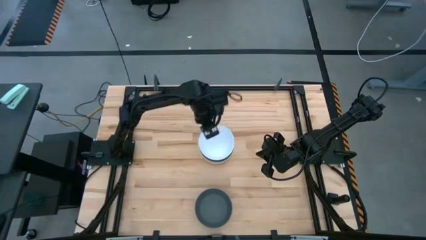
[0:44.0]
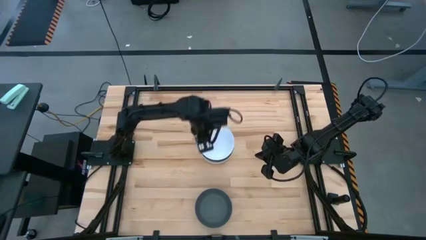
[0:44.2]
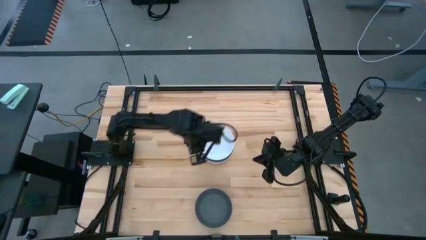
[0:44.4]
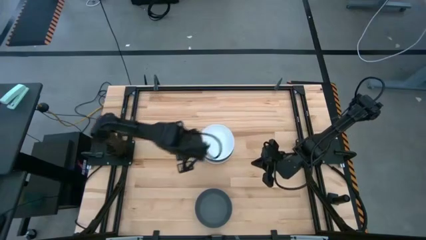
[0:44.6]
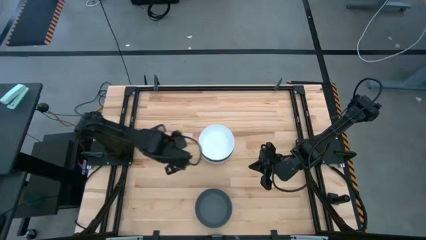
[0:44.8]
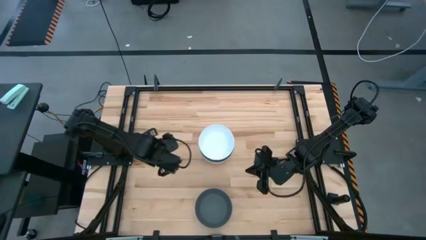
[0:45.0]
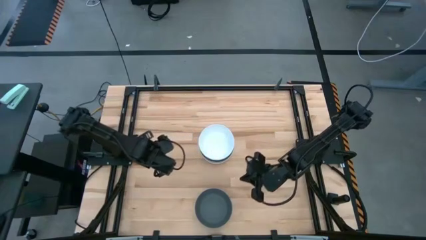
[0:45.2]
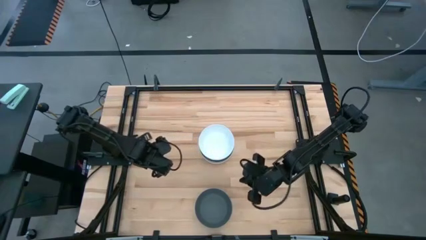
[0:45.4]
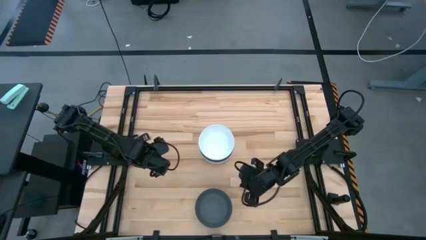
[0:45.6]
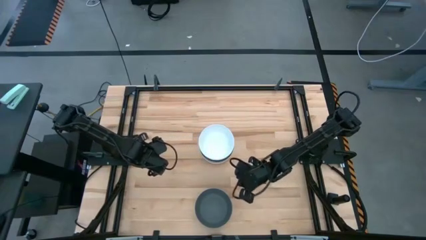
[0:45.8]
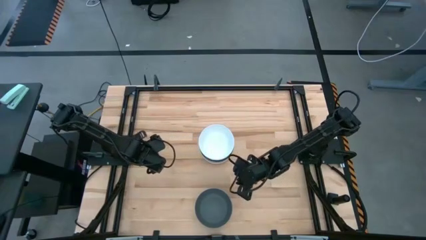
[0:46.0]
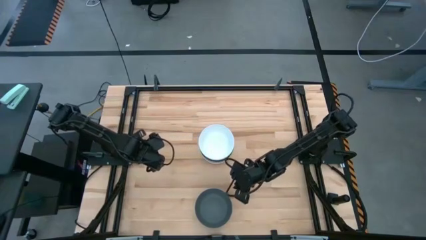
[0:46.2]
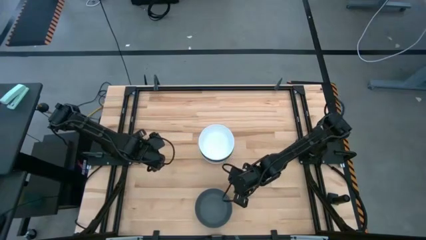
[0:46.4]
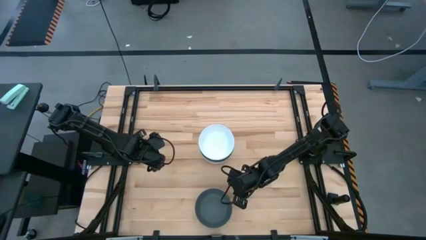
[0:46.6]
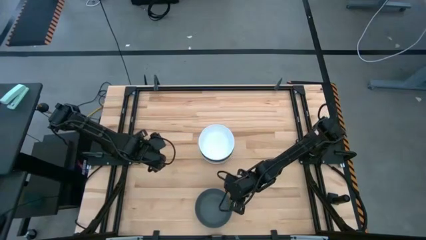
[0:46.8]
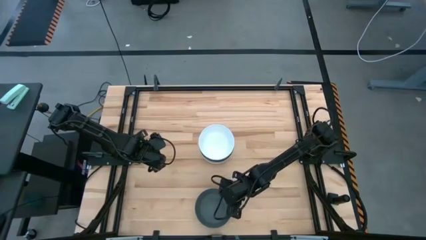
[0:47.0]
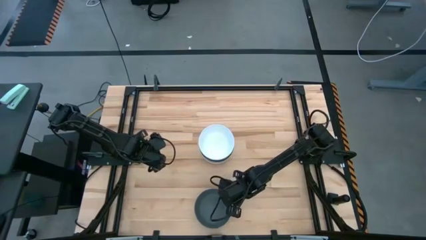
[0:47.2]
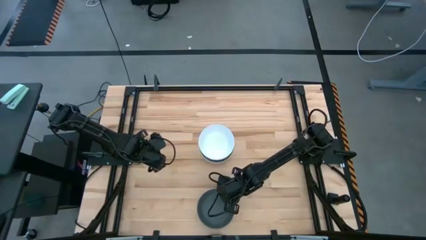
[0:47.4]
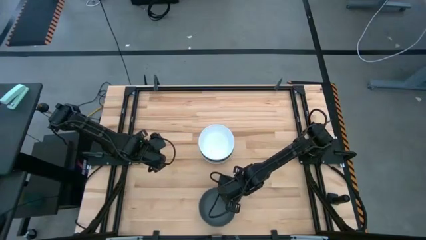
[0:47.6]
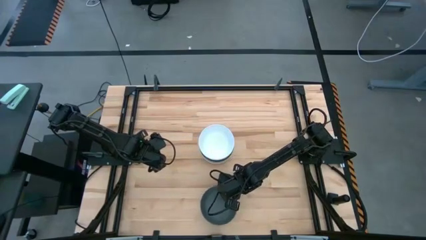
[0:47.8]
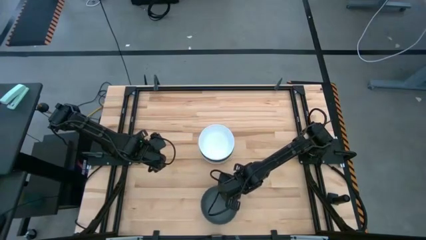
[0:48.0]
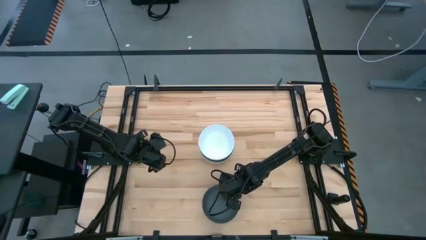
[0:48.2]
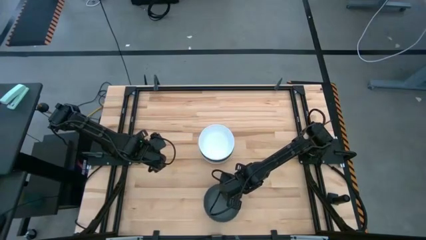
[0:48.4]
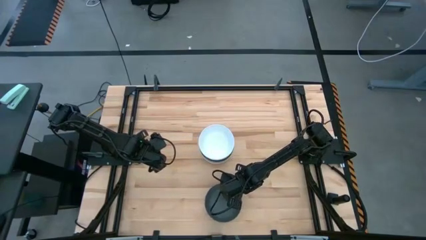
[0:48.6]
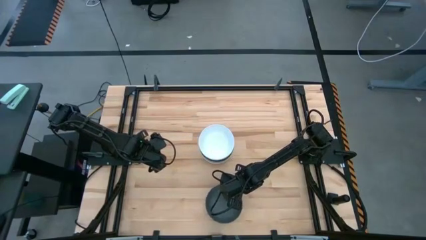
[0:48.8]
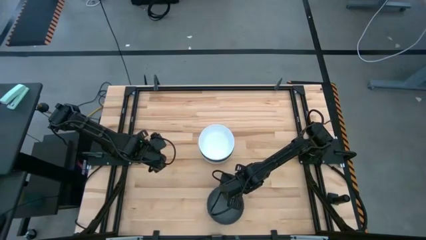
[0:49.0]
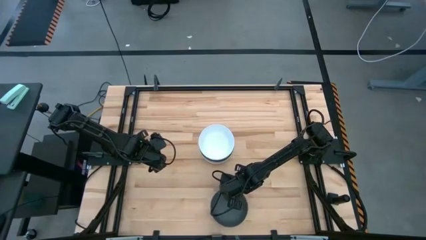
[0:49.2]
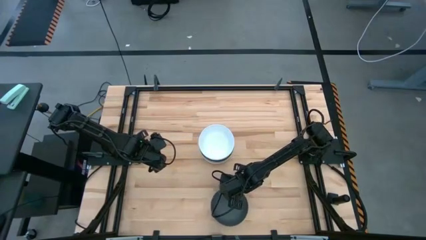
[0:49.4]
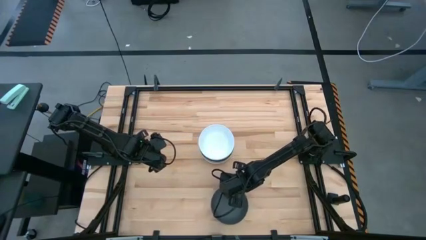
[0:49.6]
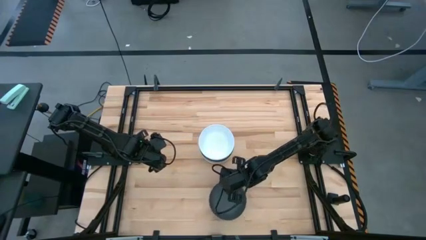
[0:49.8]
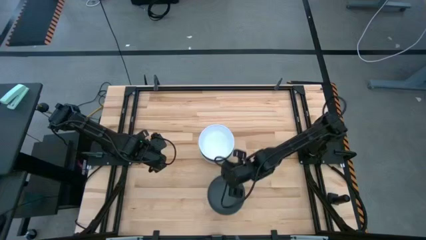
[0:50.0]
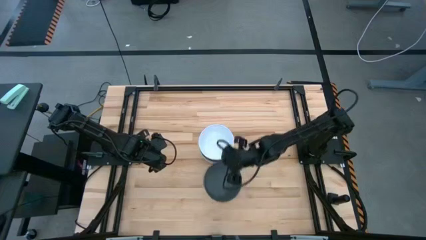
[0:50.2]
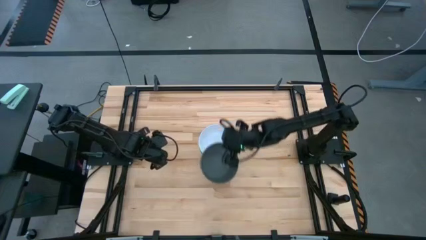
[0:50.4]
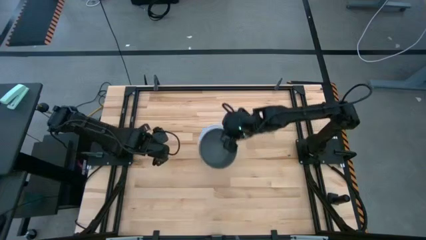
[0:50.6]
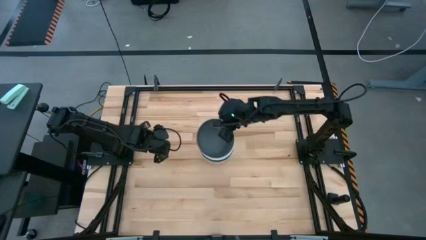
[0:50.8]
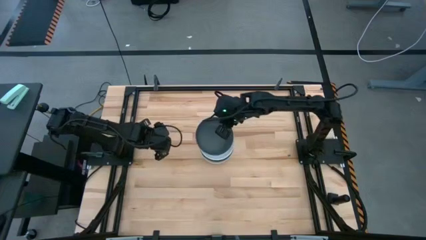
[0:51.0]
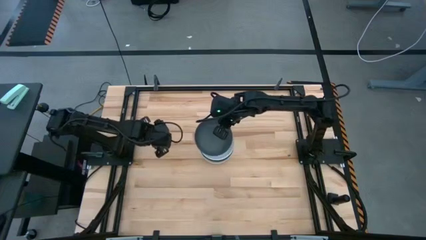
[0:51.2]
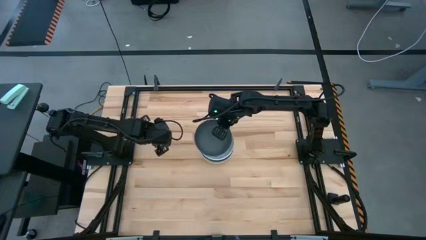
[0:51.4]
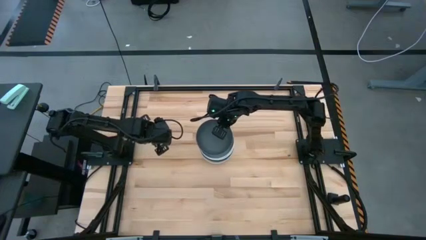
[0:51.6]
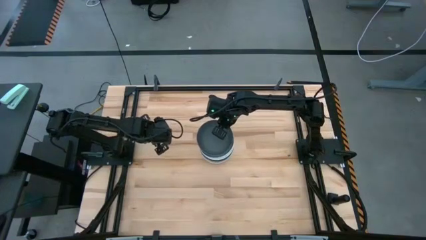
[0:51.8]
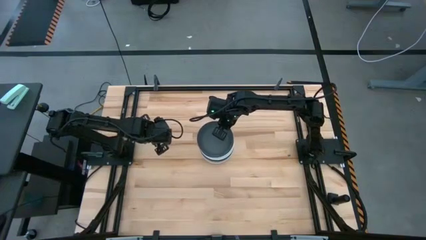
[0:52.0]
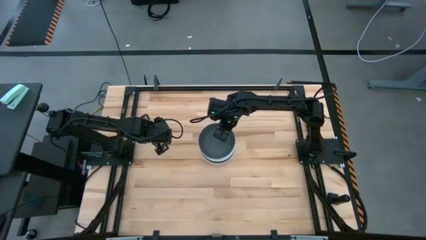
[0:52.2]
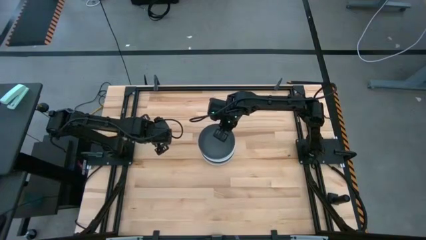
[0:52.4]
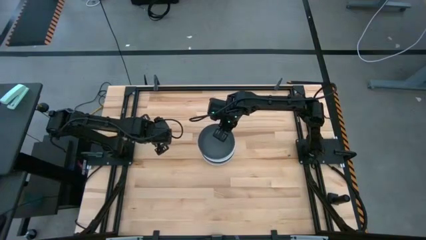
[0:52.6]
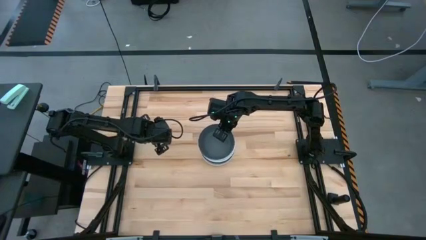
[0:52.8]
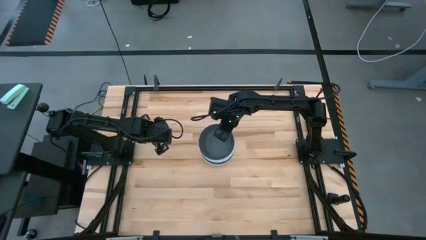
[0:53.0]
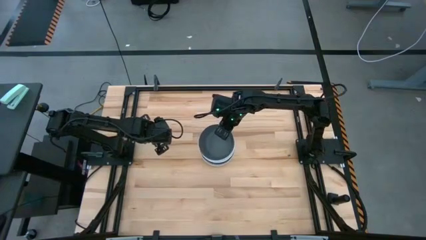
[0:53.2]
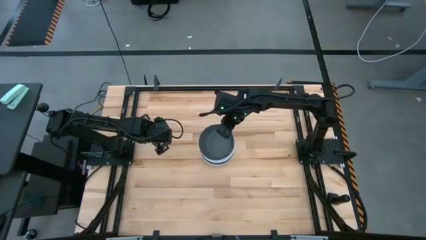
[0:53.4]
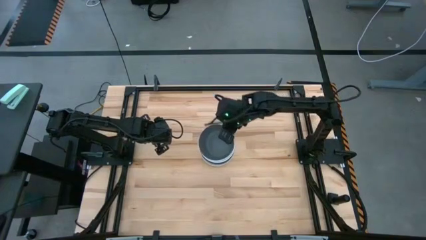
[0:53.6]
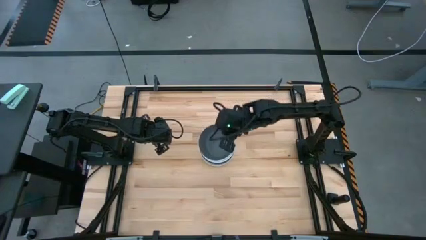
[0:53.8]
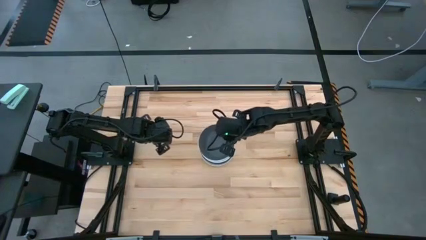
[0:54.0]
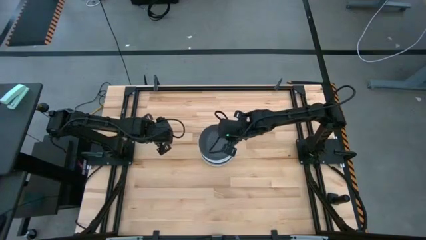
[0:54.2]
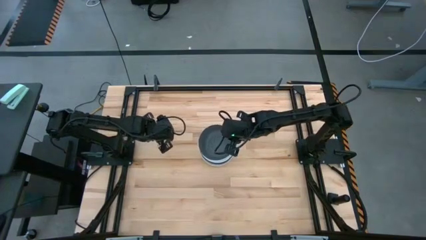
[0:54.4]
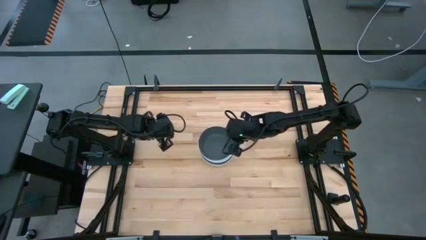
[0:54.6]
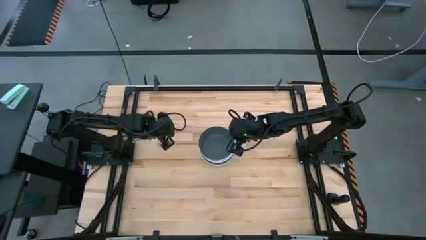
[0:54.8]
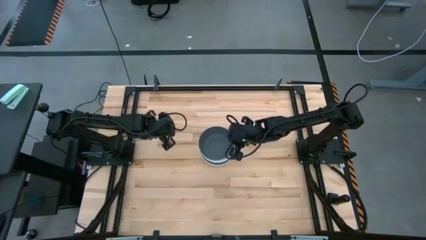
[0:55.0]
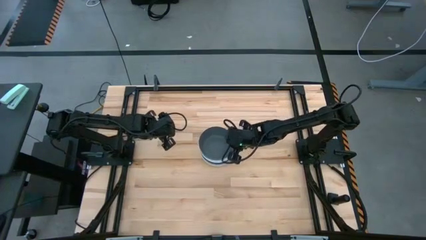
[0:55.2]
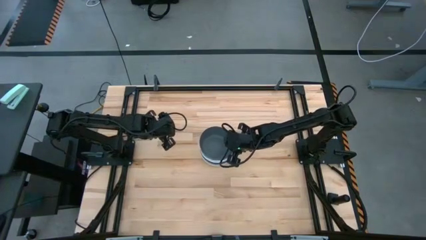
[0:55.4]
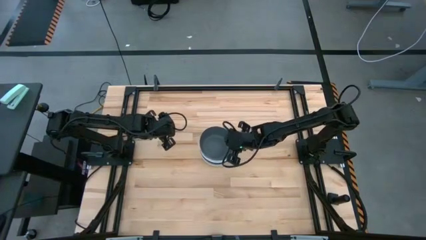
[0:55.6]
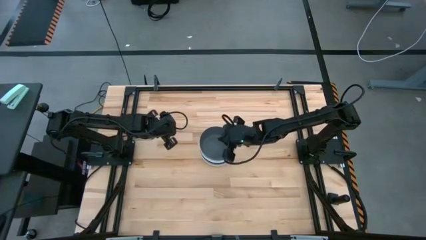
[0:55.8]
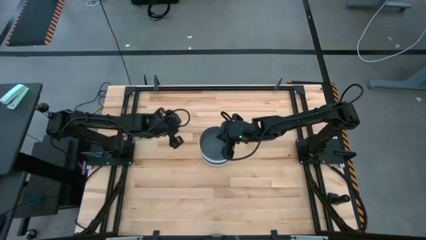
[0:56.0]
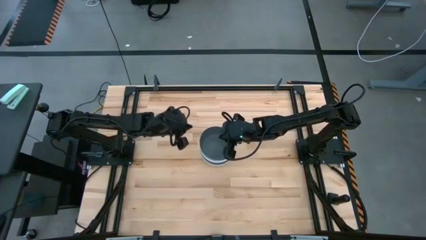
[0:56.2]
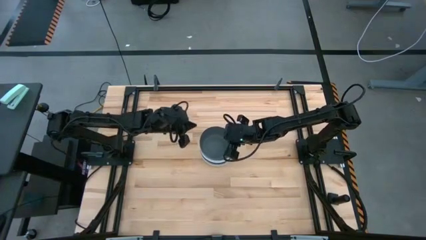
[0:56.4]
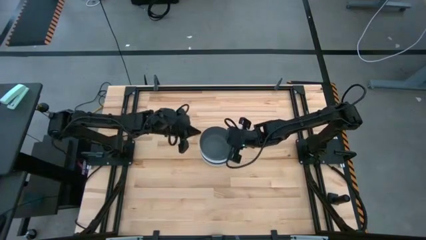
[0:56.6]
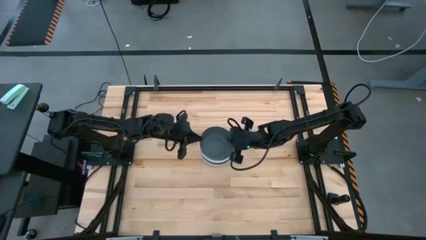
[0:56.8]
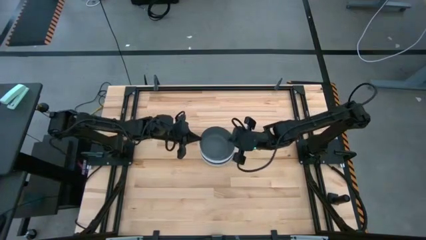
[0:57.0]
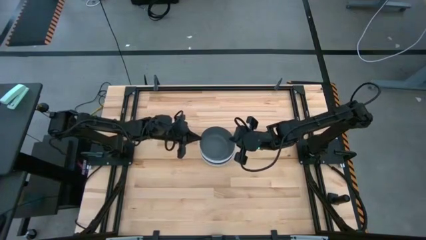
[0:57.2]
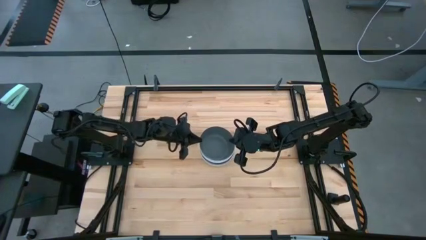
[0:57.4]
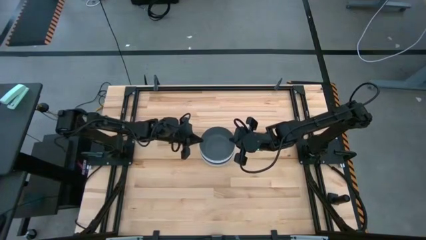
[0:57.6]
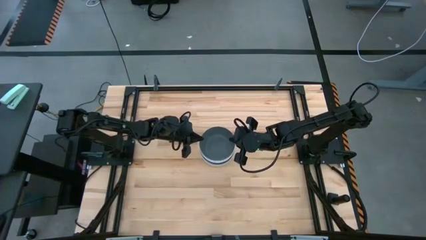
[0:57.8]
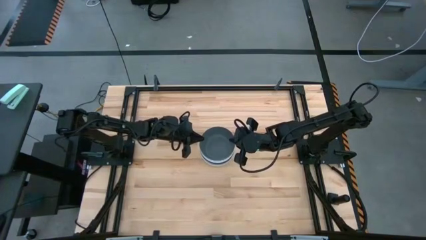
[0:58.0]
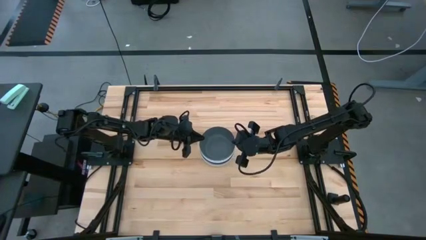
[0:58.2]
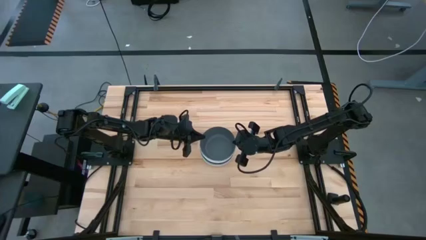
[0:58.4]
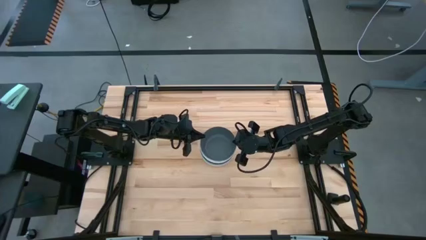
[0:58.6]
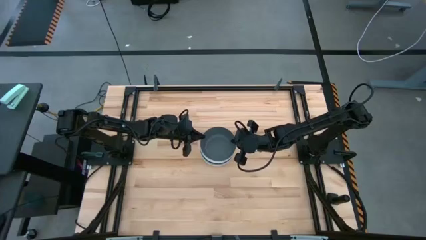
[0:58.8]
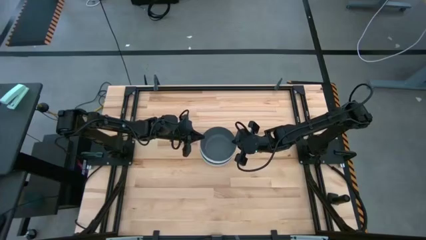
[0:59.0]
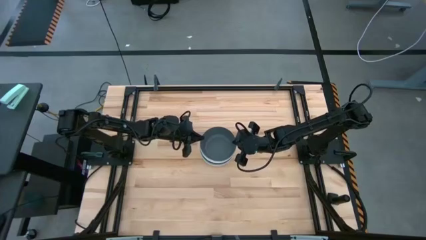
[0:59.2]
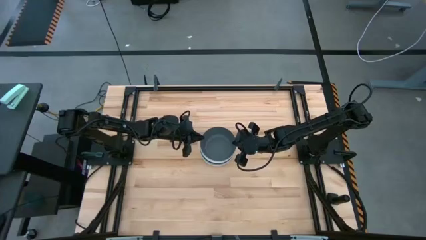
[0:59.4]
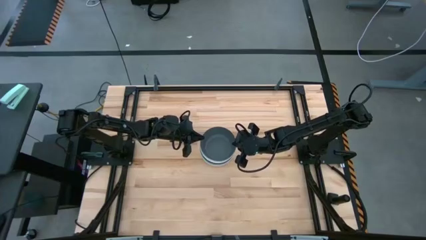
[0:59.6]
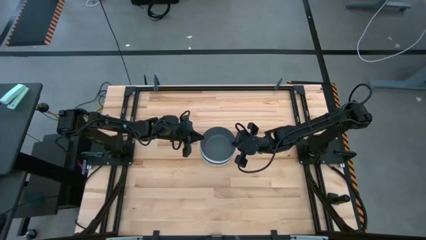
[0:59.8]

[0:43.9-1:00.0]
Task: Nest bowls inside each other
Stack the dark gray bowl on top of the stacked bowls
